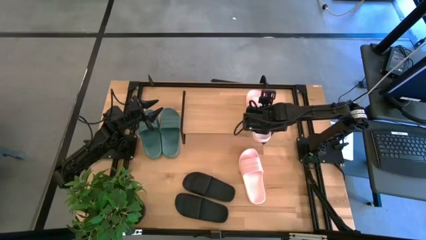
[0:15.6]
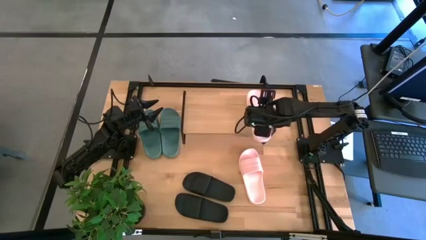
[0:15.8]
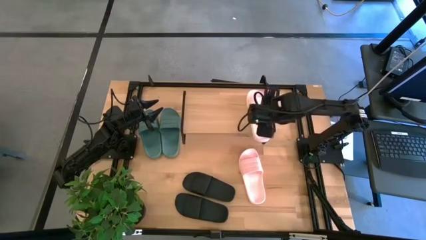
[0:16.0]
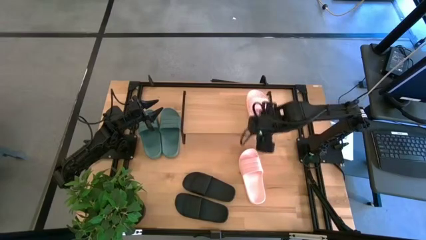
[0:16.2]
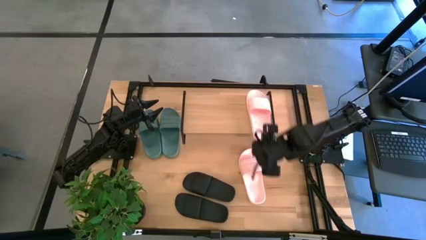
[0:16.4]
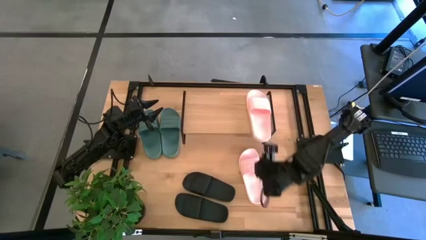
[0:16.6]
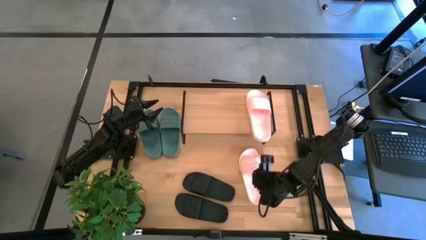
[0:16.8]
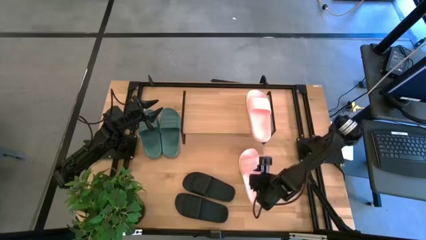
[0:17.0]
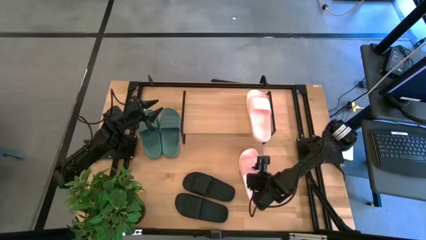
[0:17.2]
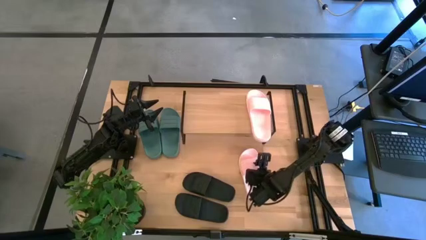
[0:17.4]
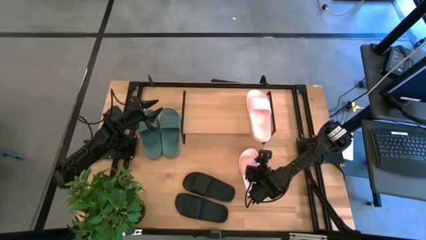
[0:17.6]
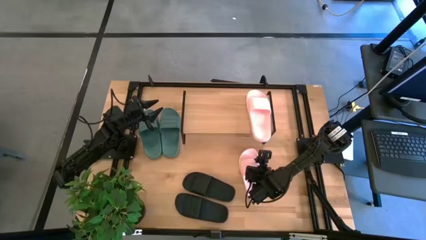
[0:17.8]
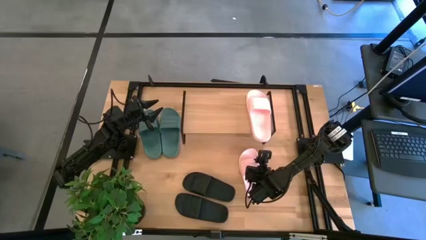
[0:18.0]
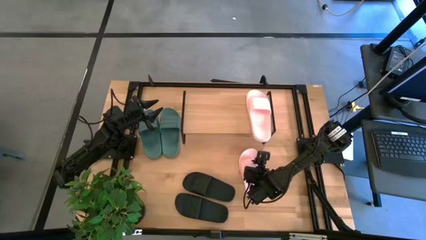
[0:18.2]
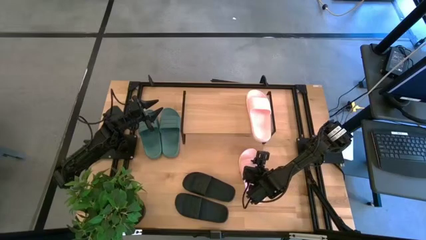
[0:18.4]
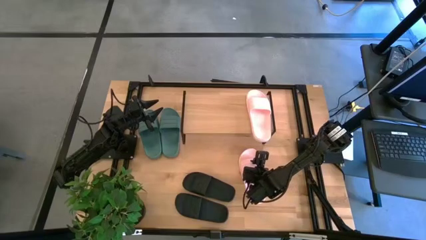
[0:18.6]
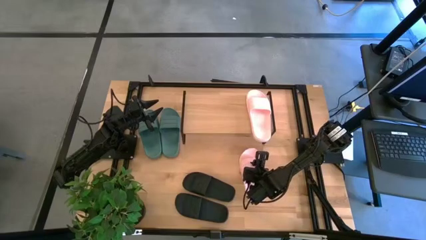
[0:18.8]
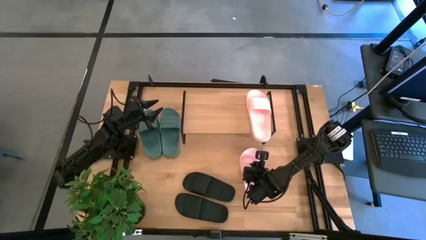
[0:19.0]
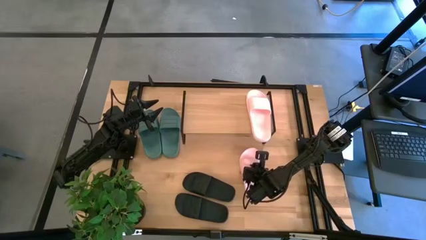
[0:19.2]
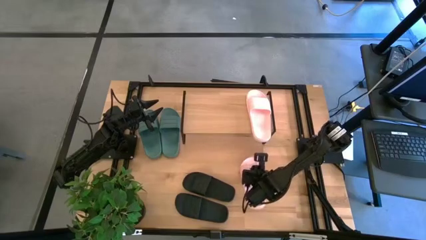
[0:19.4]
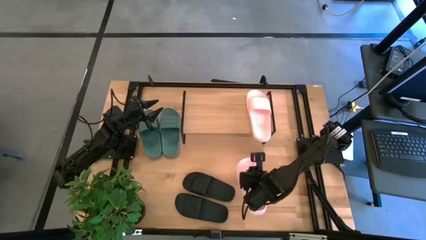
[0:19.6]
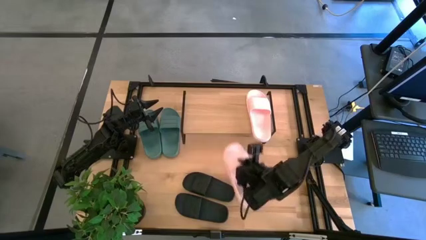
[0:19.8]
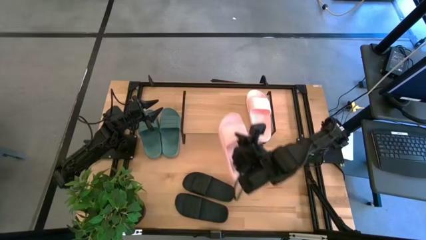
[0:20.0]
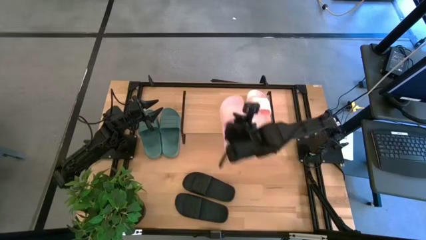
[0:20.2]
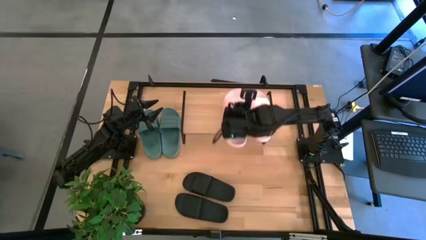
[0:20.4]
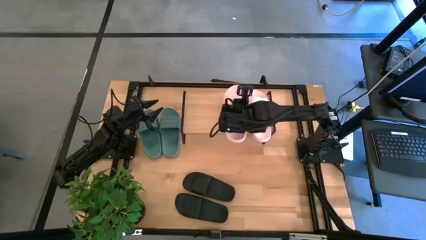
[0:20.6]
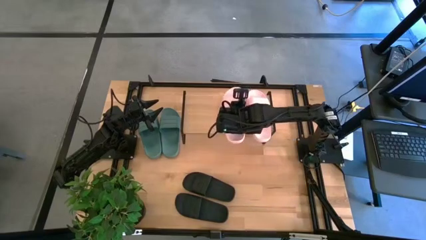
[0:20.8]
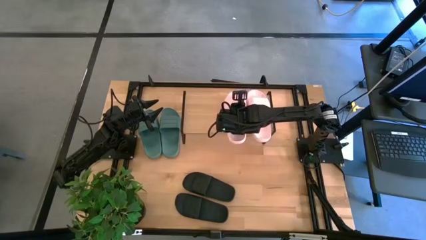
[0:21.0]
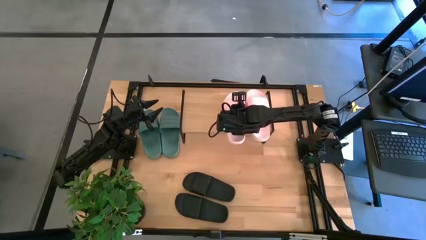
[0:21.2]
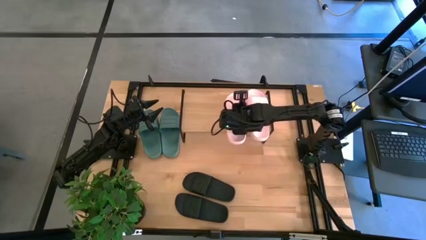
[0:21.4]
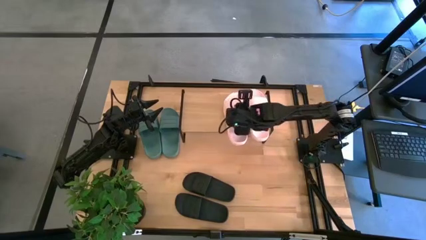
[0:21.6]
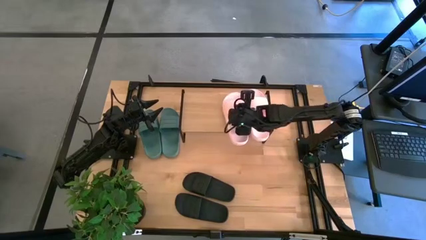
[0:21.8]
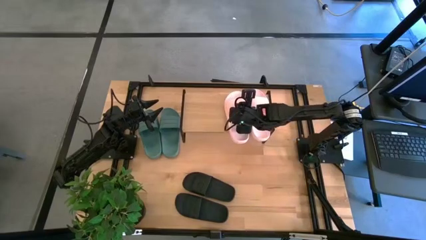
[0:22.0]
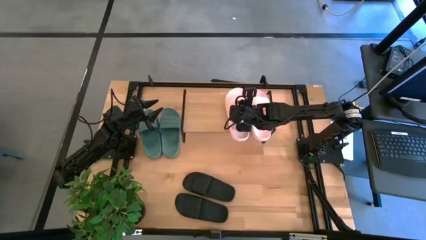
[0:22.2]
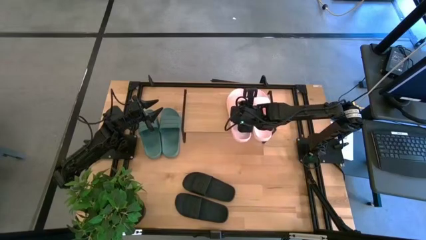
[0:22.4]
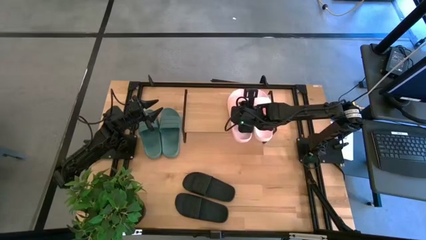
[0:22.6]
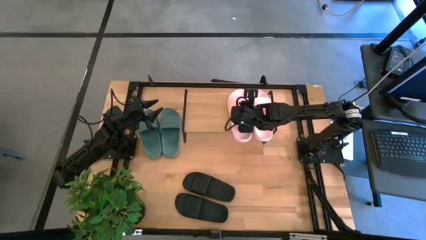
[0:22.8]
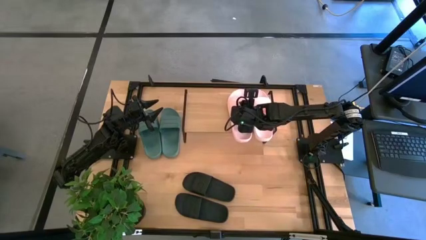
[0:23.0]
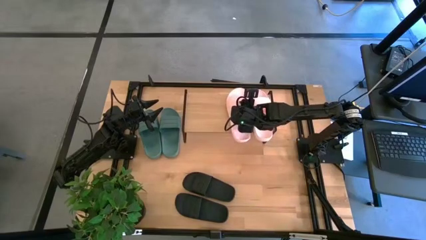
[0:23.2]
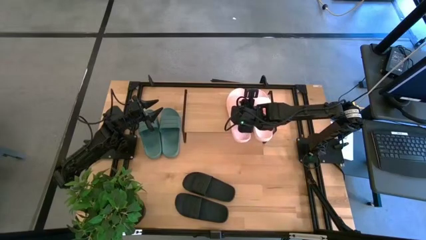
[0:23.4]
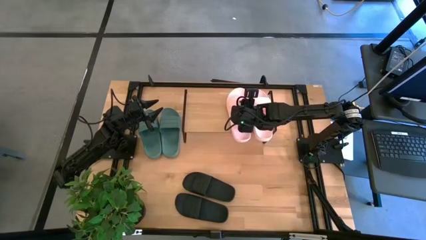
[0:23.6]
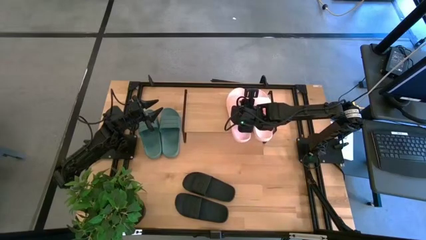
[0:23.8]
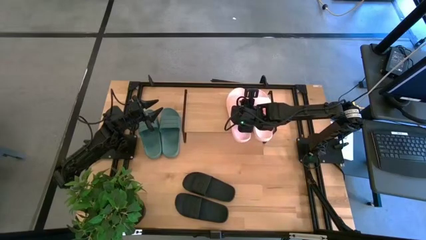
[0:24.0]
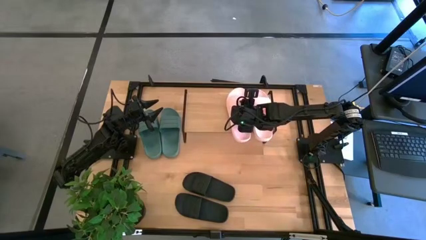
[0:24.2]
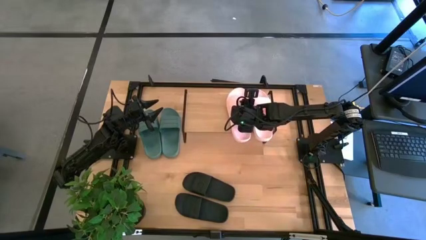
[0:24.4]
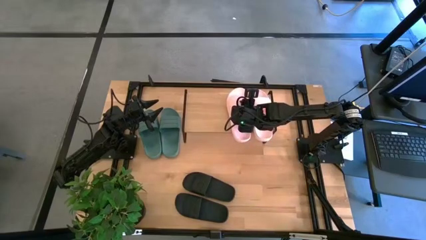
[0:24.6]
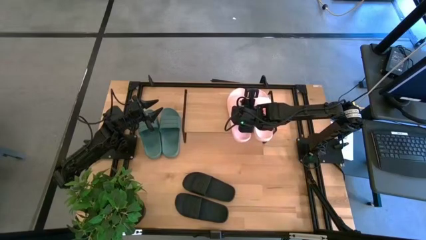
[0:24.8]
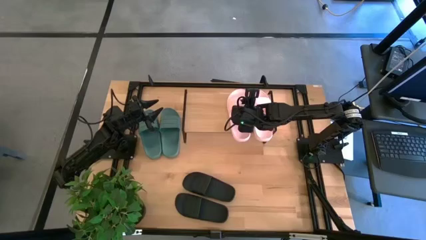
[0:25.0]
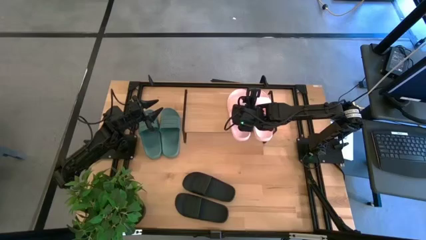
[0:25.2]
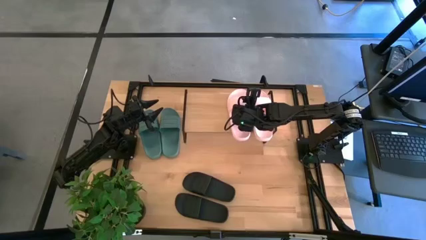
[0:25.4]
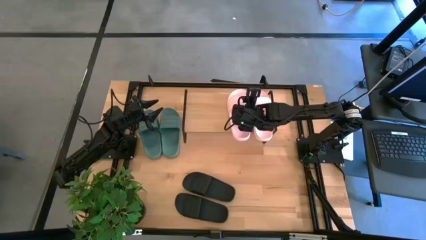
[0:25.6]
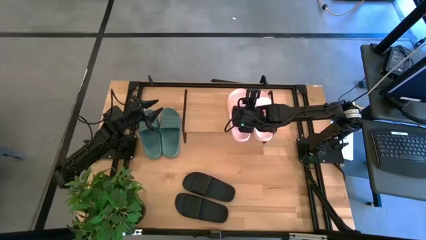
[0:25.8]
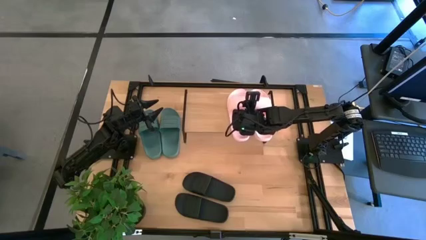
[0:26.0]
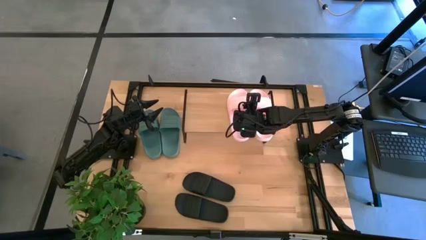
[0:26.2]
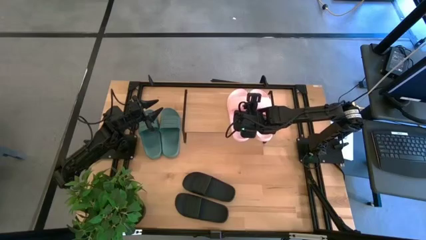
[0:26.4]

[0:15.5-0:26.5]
Task: Pick and place slides into the shelf
Put the pink slide on the shelf

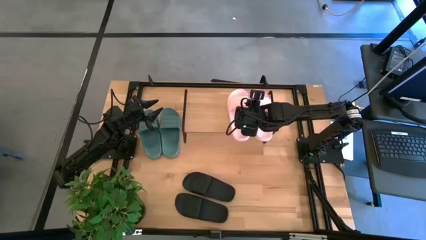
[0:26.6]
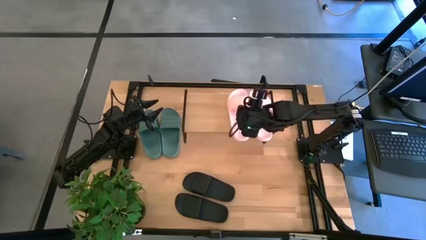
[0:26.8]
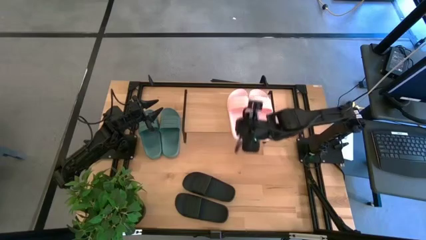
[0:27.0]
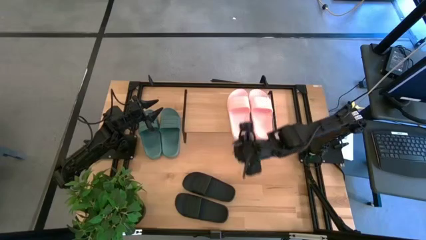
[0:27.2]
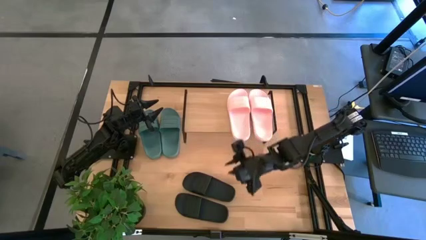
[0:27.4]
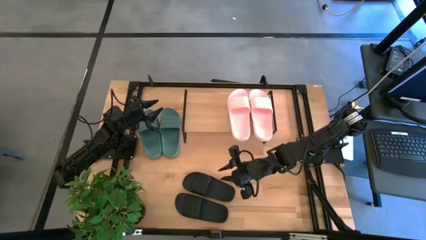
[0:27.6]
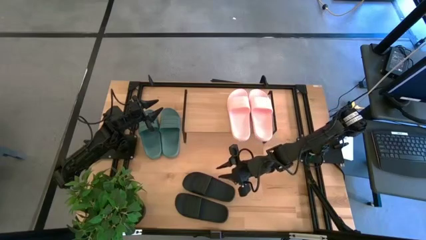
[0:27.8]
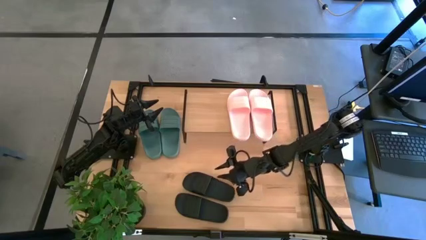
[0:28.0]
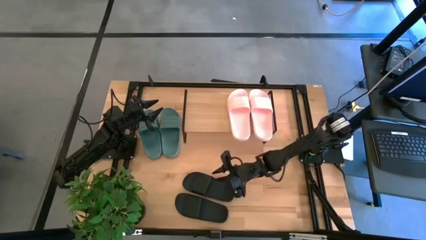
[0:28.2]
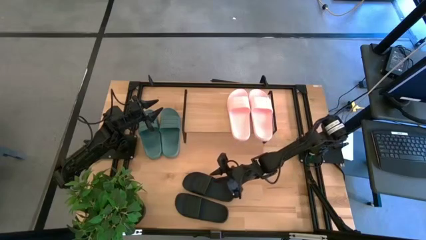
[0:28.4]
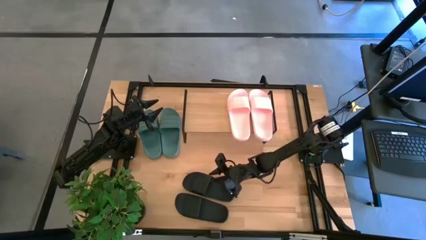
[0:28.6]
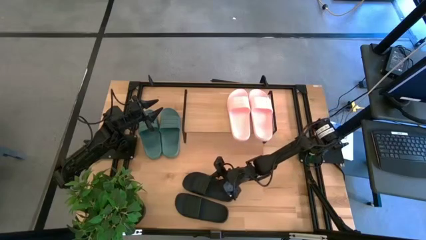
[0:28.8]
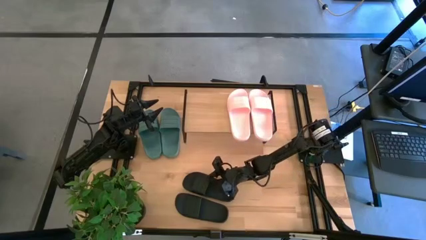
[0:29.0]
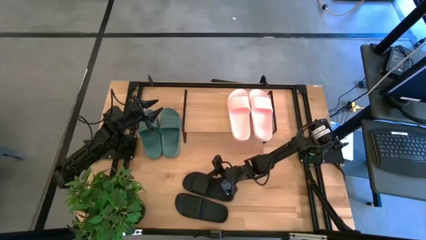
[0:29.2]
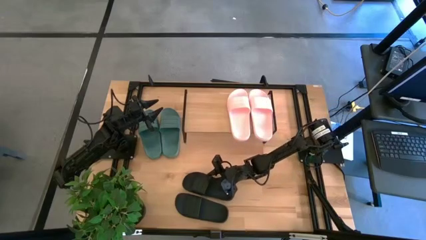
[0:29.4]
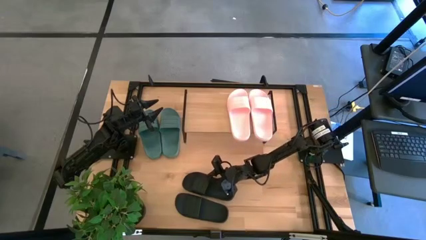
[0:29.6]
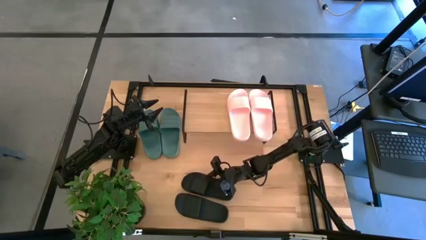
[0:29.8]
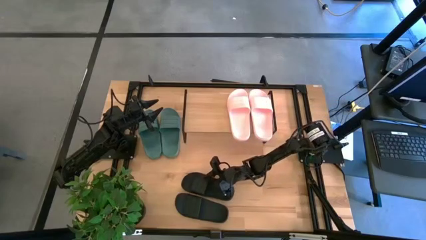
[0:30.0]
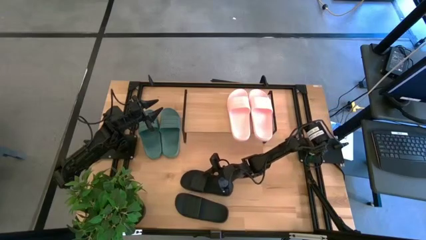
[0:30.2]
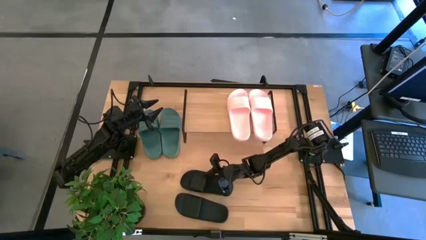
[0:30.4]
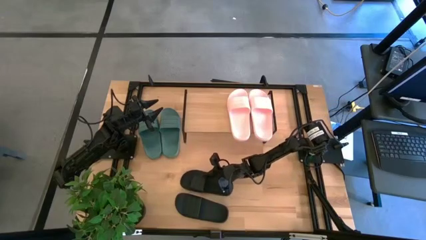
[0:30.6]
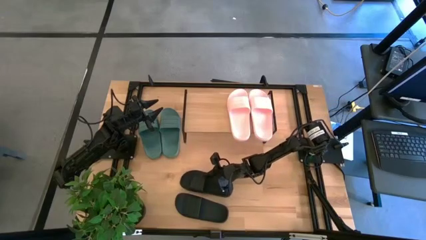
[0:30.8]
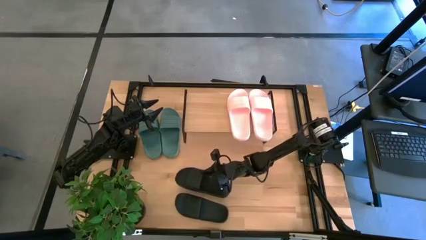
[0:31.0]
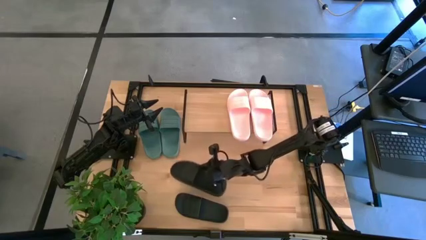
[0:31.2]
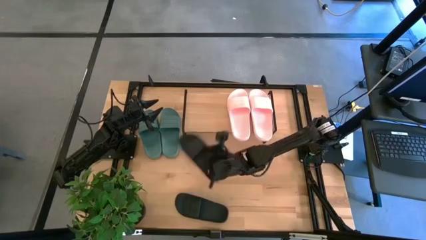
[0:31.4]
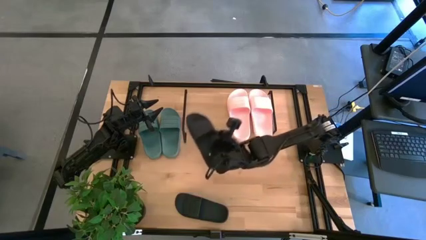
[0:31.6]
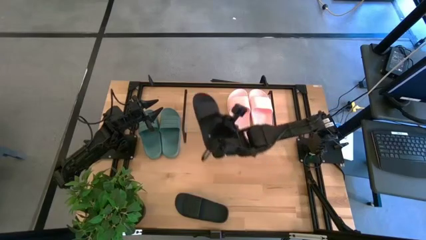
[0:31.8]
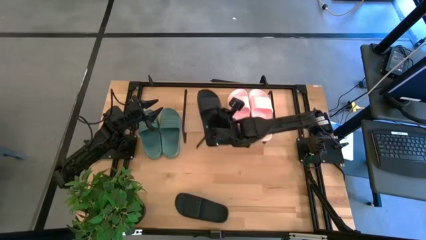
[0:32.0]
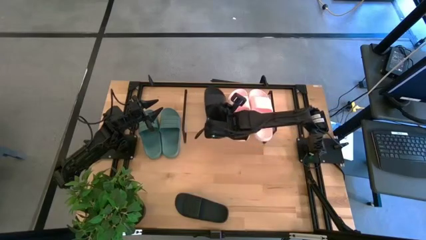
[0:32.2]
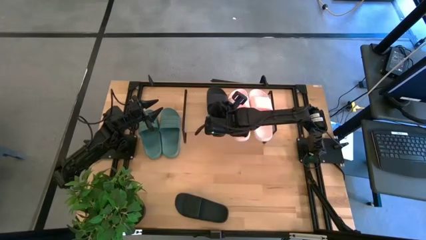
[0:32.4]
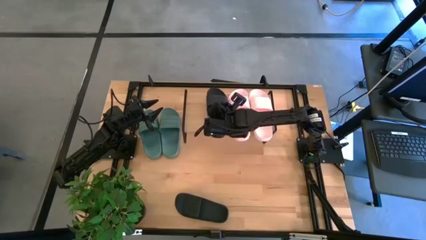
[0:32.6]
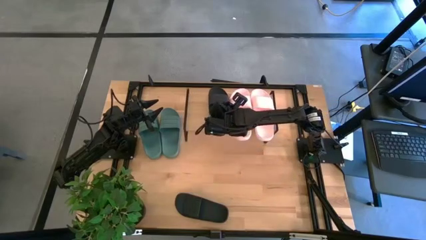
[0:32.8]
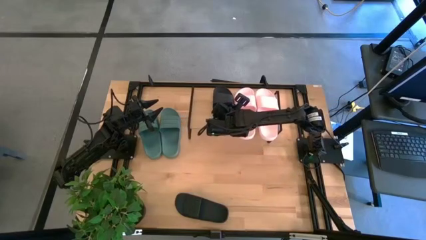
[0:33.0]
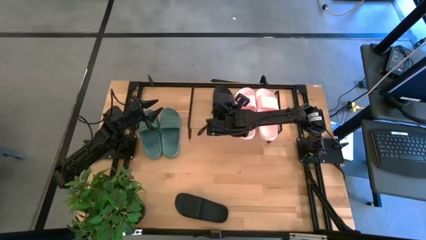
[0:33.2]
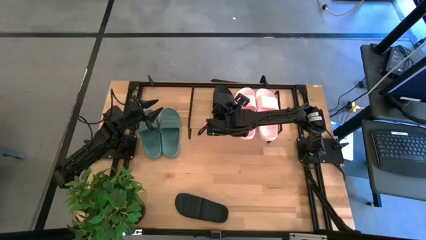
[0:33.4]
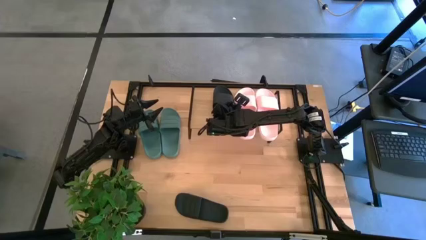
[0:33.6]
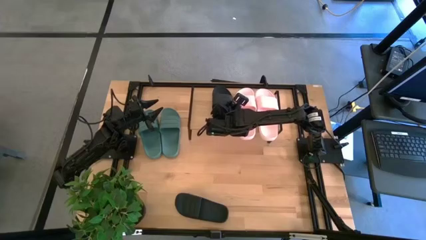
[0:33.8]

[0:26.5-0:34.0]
Put the top black slide on the shelf
